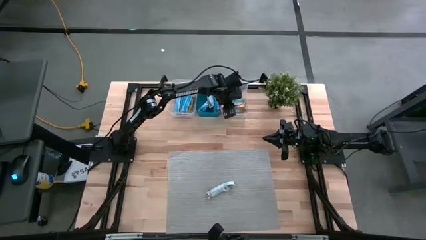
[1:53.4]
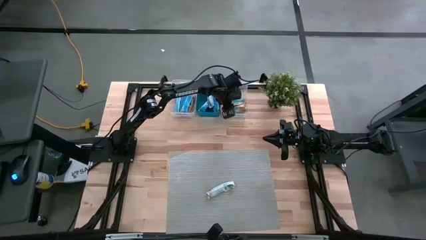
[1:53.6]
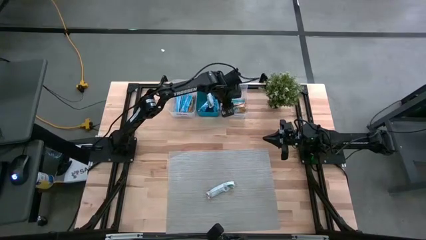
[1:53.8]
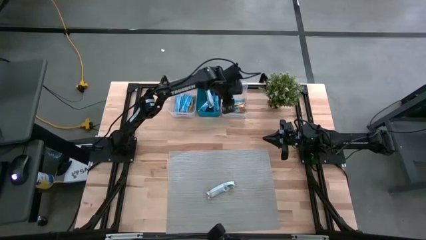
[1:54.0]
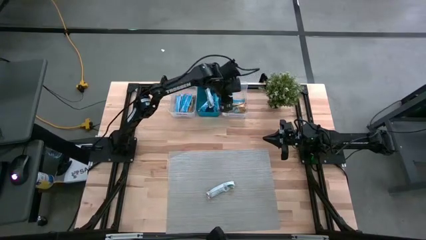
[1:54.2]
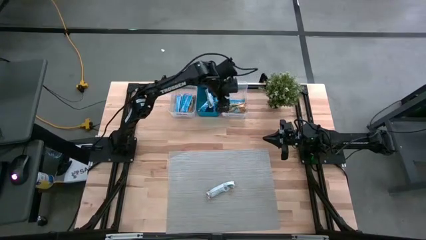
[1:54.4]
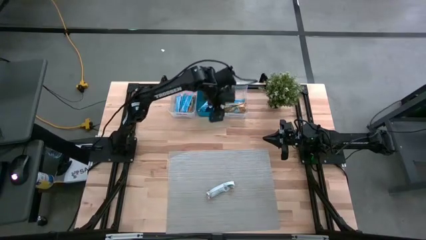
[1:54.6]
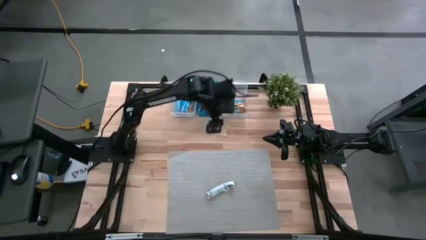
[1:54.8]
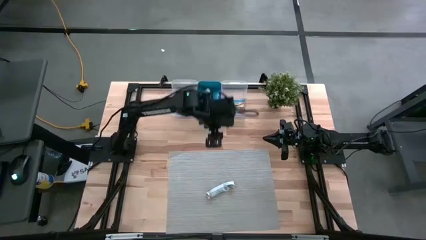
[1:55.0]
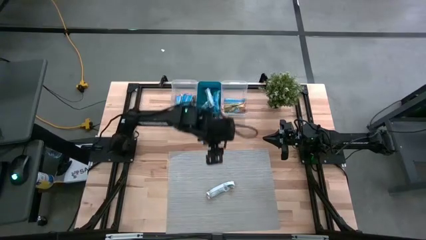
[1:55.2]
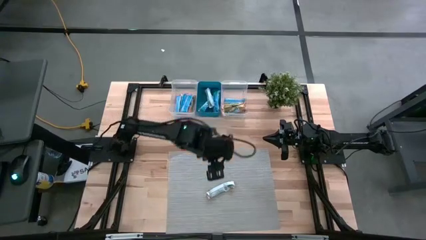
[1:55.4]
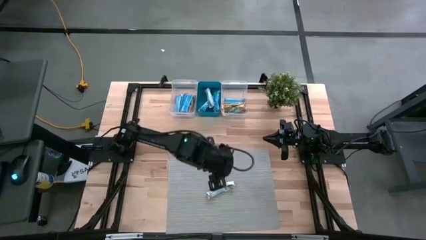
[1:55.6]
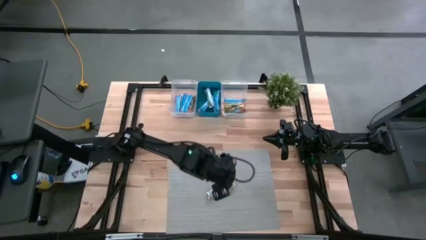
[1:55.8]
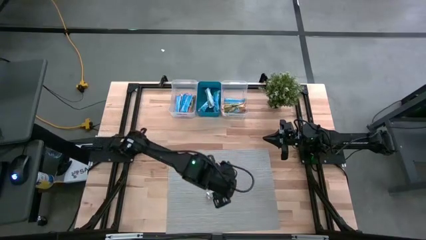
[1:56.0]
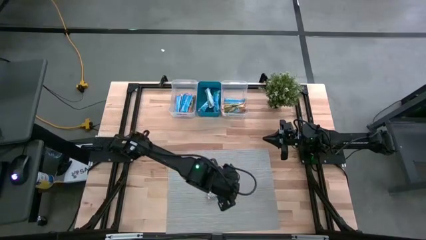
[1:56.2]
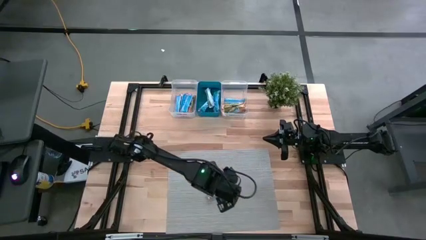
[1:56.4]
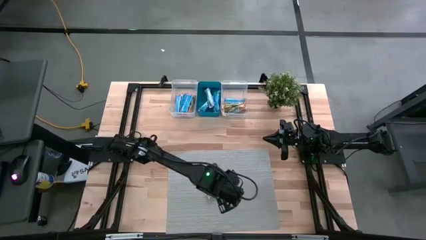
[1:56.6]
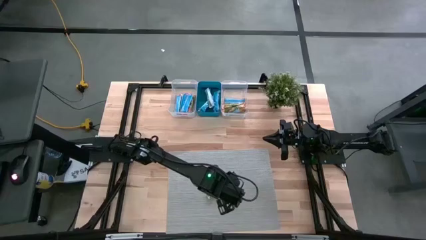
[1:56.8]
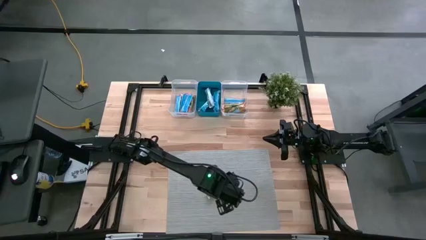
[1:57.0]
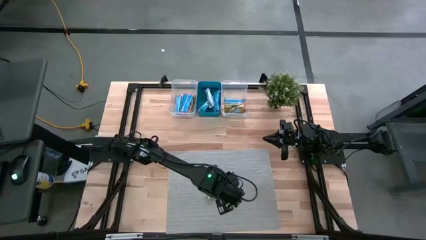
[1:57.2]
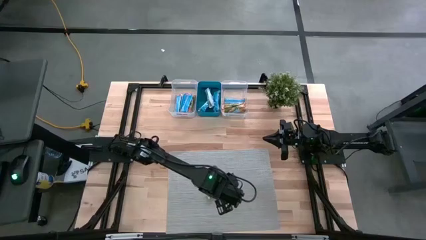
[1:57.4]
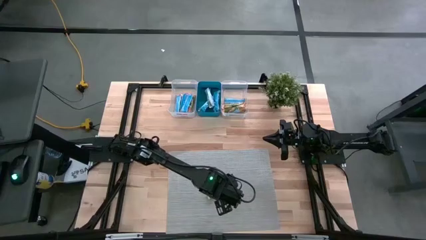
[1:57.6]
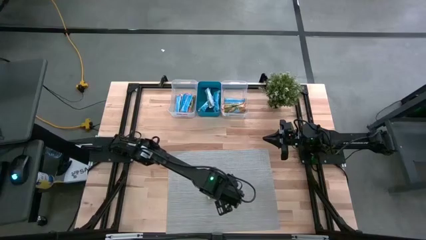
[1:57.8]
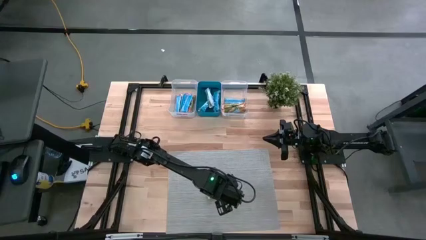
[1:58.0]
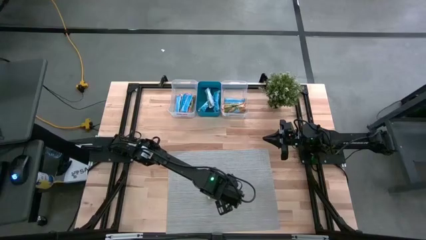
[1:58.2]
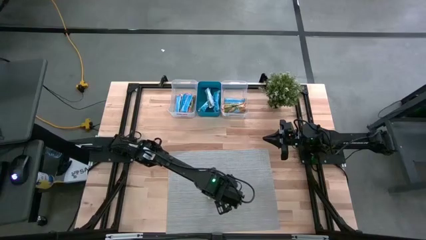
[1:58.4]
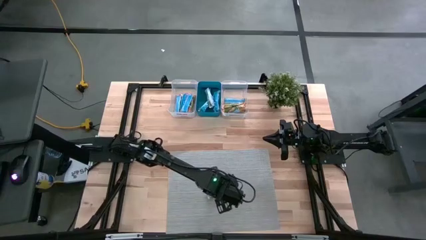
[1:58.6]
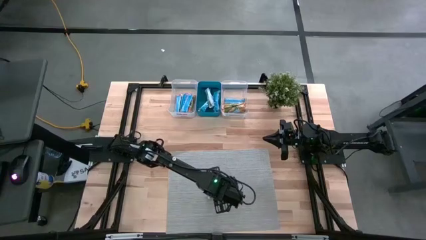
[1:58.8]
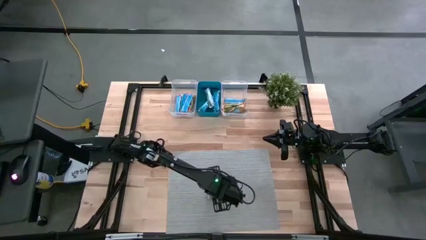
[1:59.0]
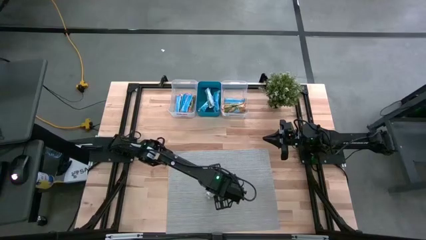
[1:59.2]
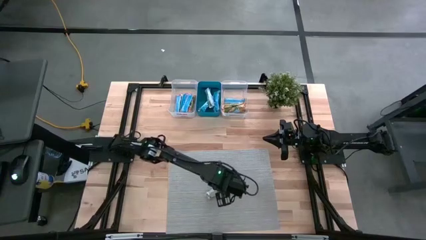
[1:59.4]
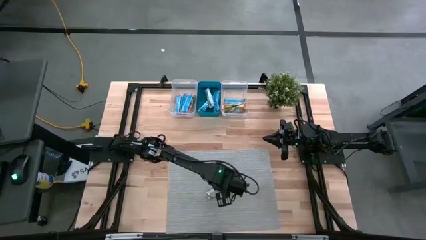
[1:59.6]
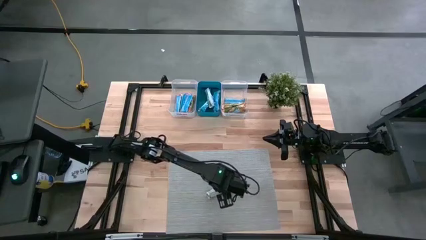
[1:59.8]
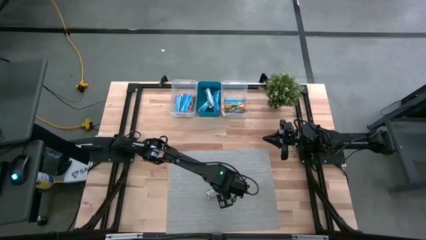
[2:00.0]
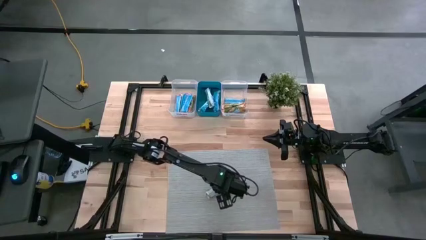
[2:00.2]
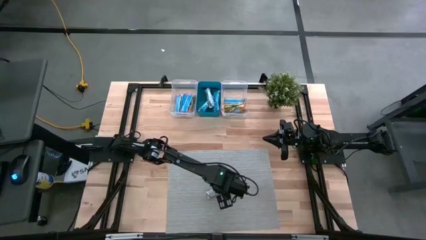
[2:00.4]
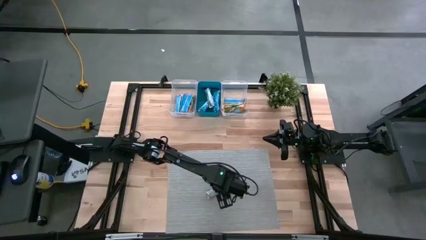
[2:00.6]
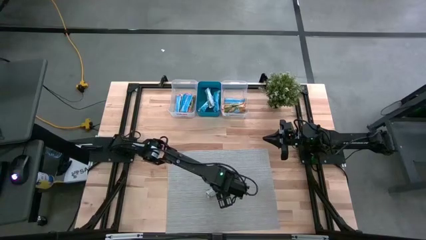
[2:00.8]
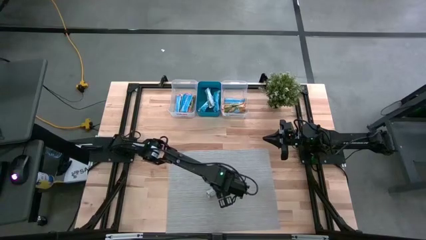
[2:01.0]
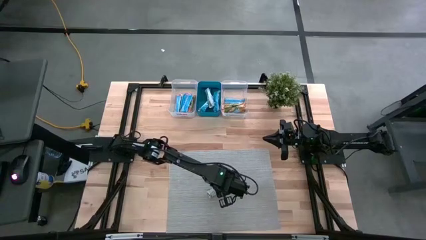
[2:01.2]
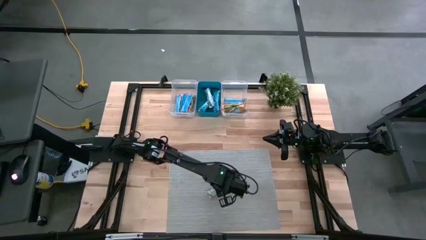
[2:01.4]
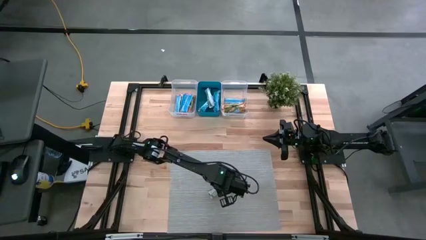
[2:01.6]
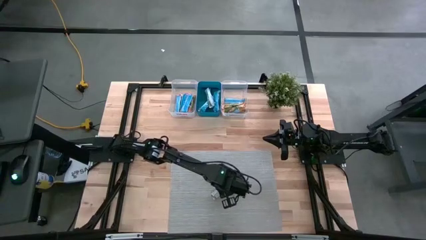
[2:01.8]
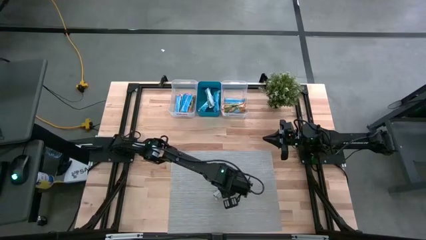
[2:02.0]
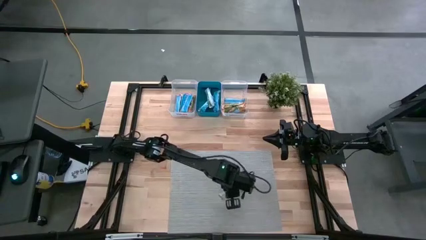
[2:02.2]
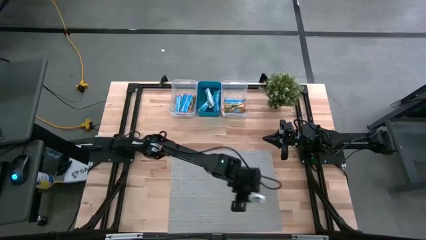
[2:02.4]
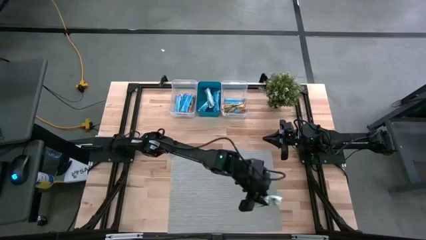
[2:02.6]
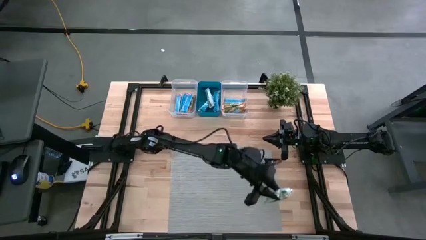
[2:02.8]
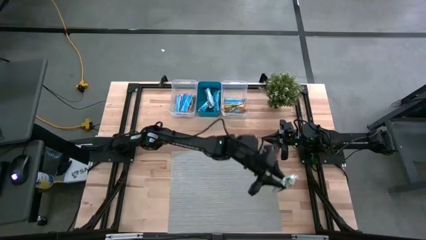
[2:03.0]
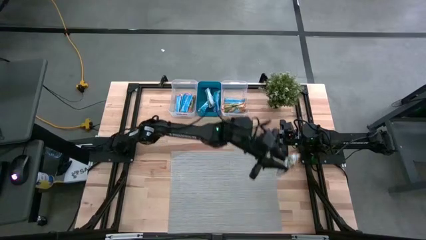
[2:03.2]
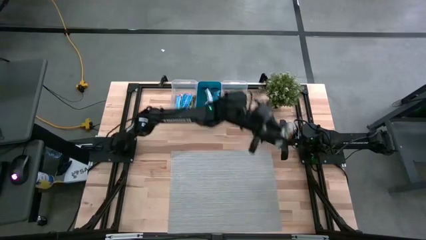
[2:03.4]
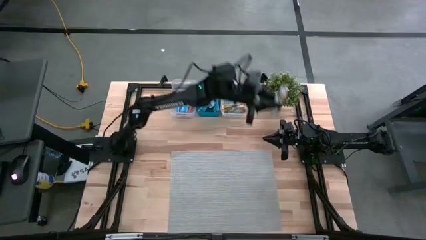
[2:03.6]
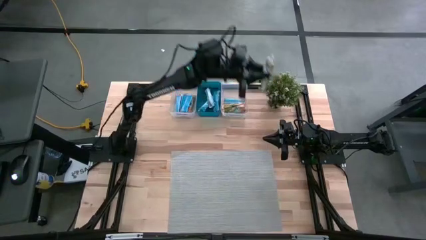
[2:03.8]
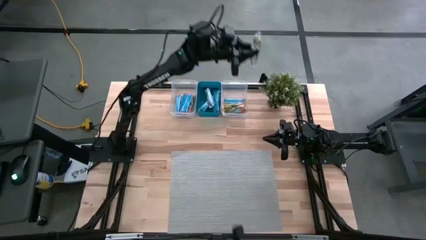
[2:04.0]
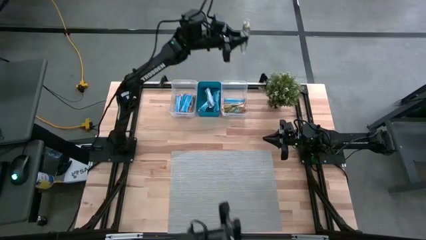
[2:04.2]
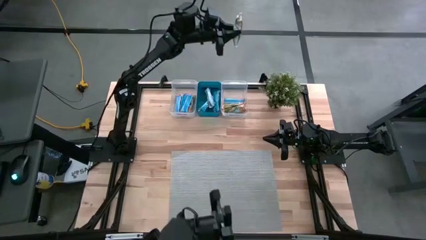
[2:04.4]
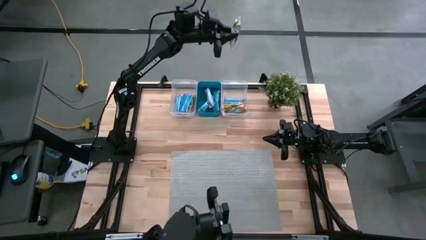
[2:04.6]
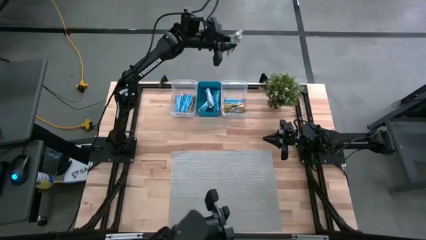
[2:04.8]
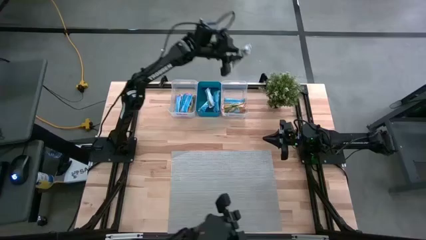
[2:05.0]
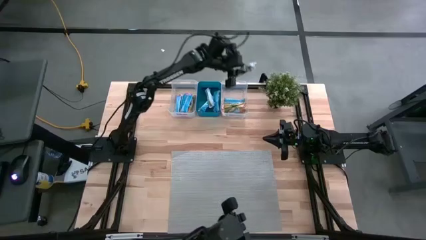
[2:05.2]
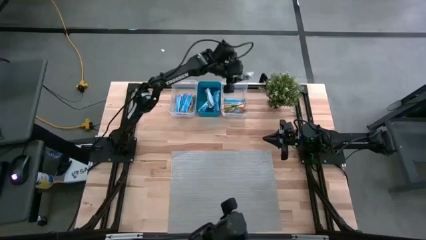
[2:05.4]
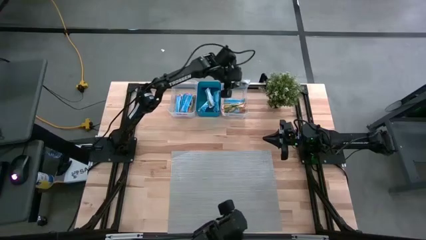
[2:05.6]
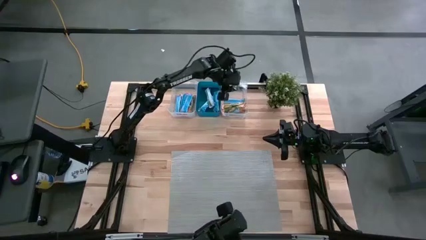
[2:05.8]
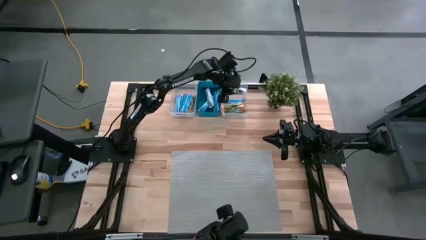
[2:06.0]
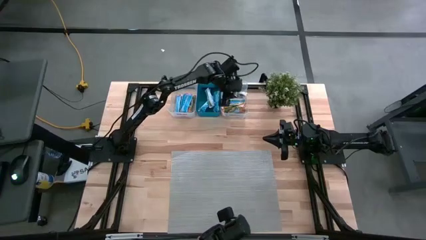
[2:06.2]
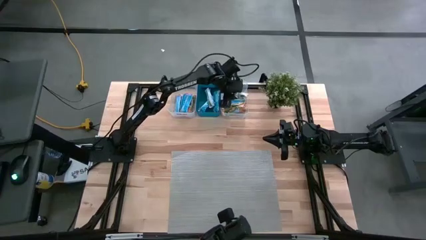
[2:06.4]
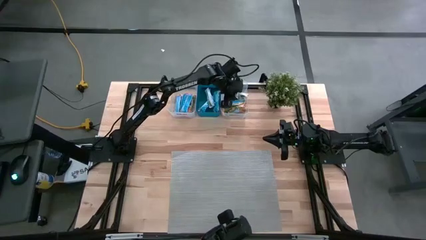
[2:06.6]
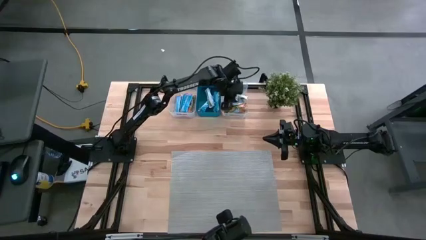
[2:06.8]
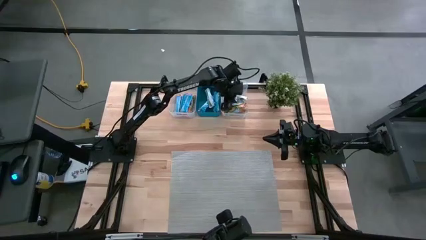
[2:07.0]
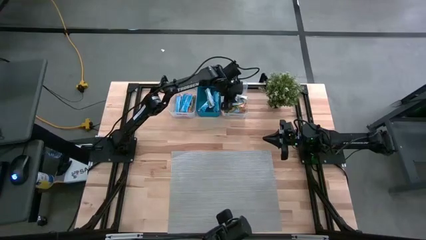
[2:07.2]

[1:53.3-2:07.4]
Task: Pick and place Granola Bars by type
Put the yellow granola bar into the right transparent bin
